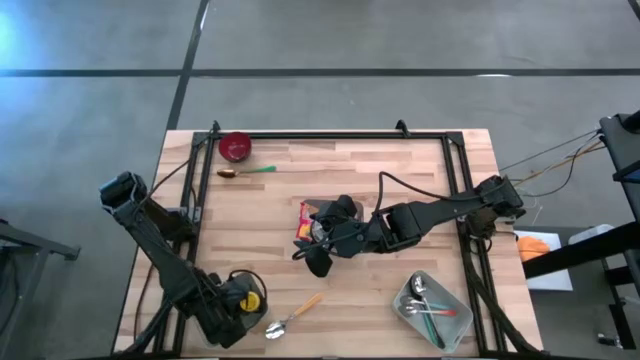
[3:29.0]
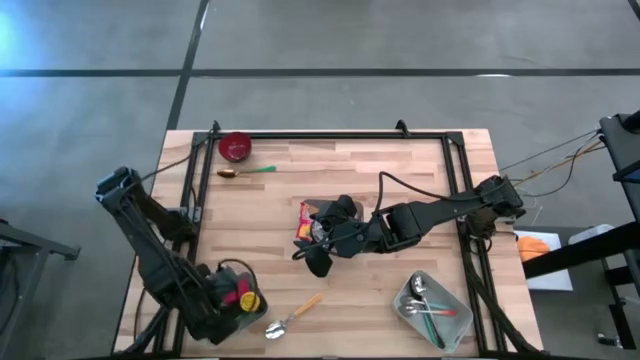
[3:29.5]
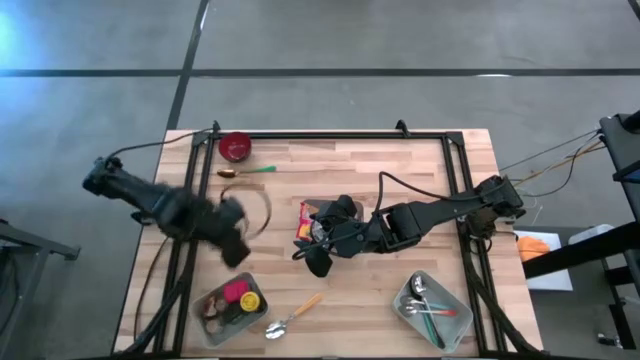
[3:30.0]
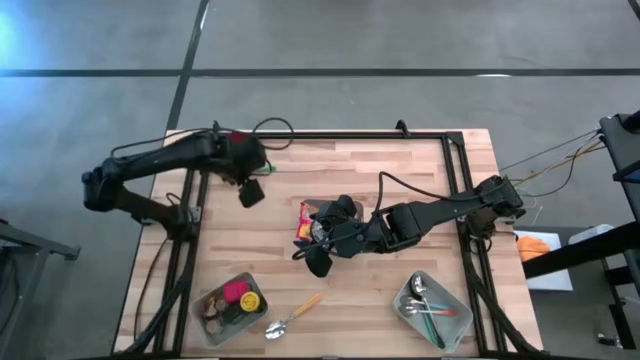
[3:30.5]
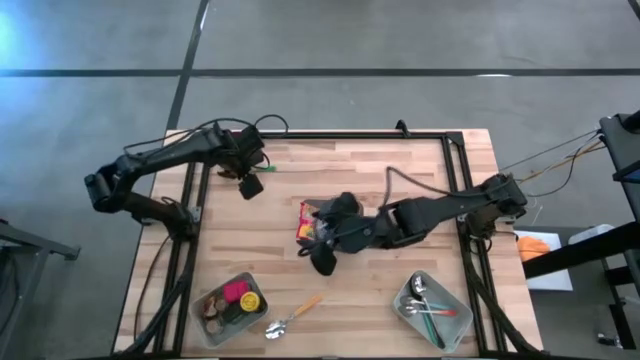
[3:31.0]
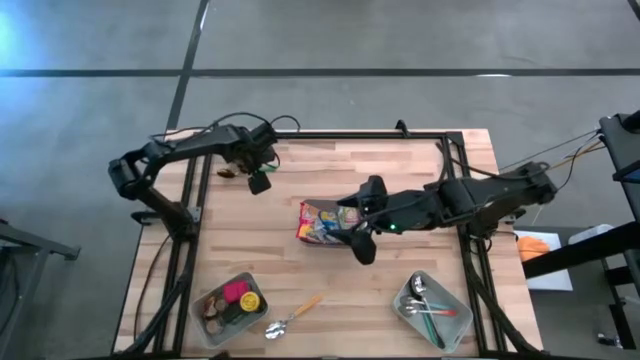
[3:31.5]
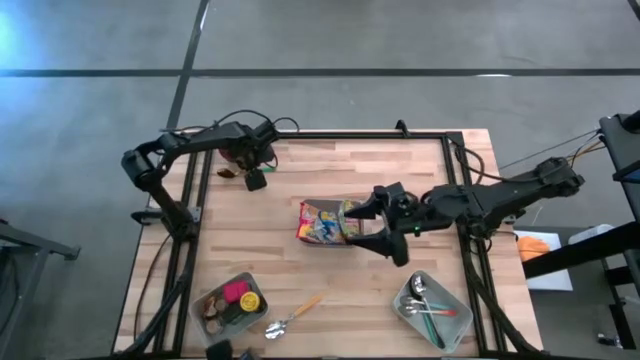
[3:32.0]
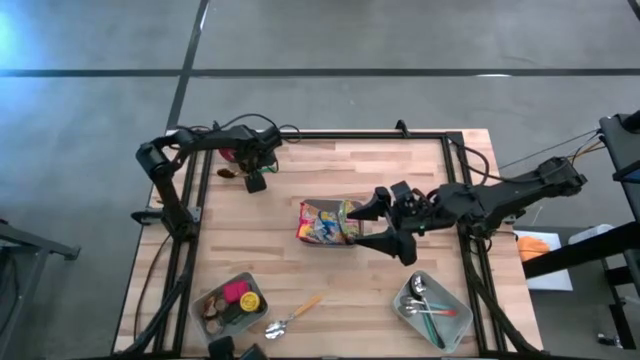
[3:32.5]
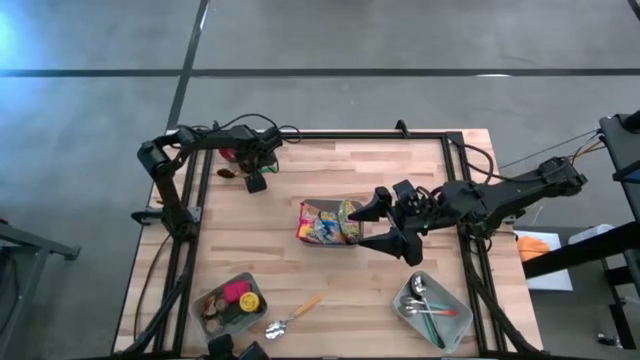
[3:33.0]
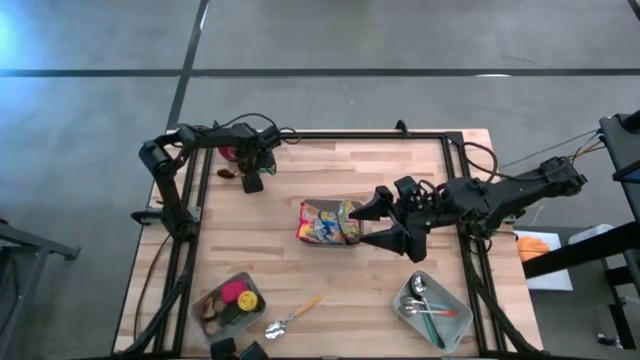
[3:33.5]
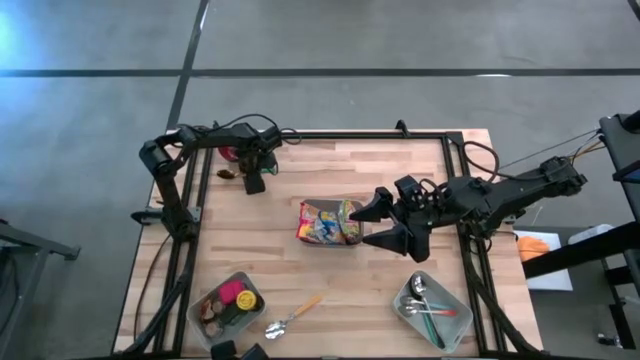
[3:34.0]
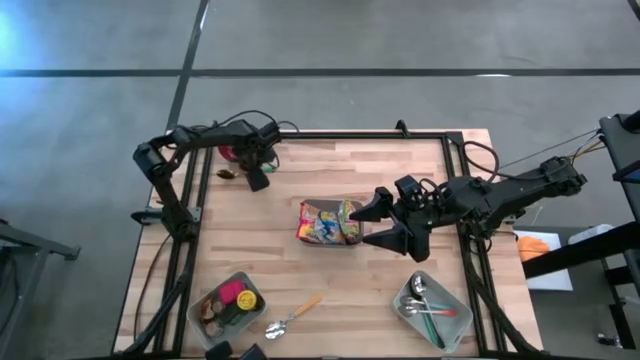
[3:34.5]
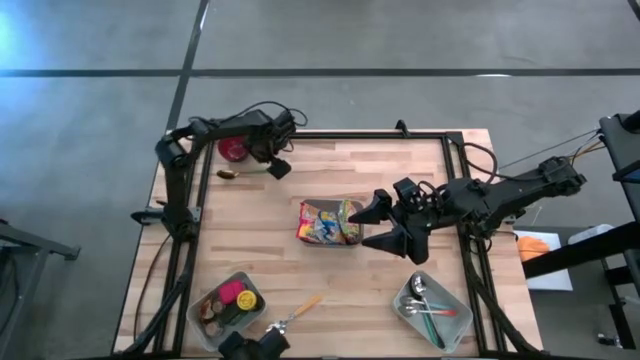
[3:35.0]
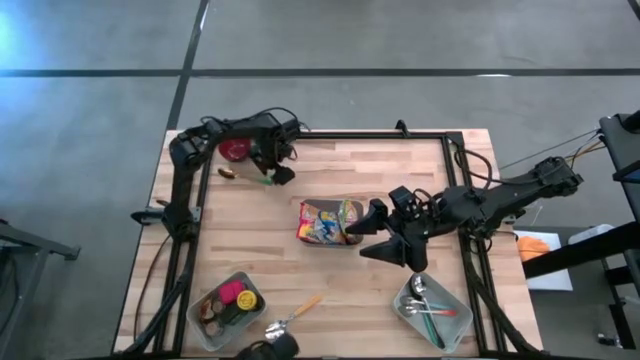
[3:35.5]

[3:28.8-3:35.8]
Put the green spoon into the right grey bin

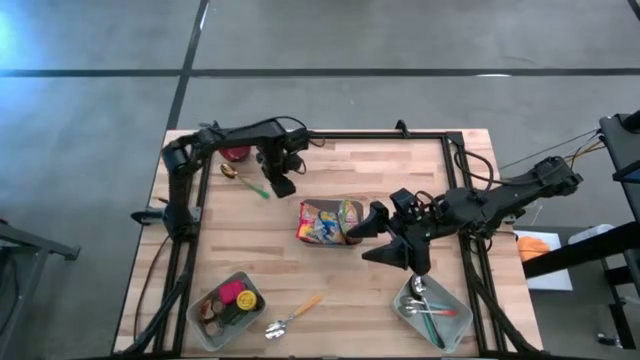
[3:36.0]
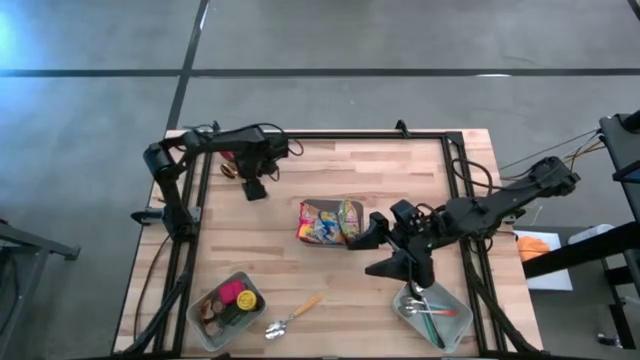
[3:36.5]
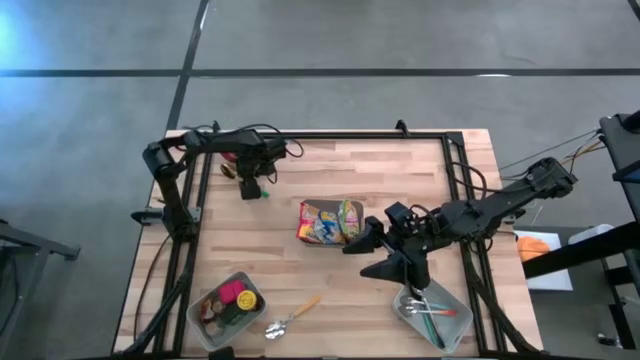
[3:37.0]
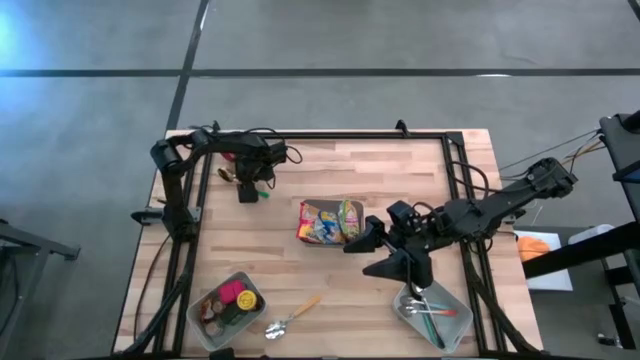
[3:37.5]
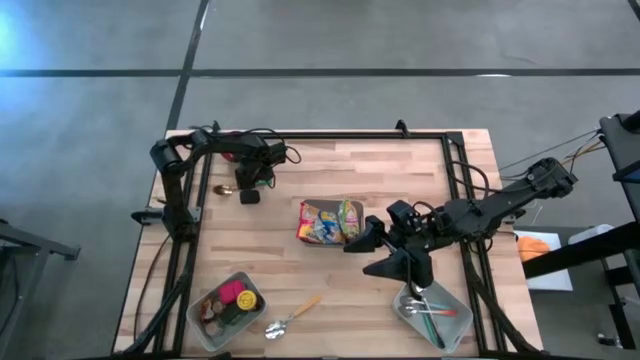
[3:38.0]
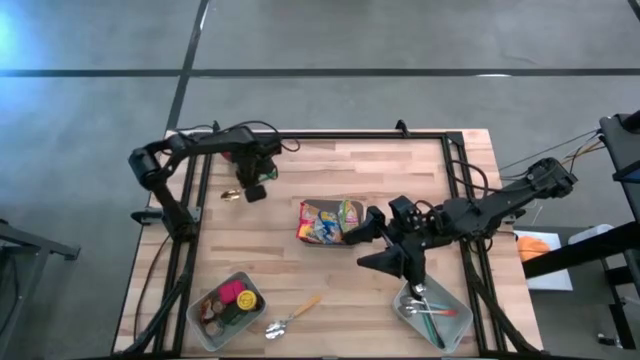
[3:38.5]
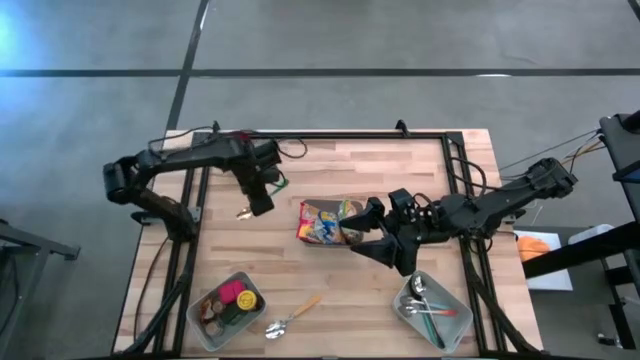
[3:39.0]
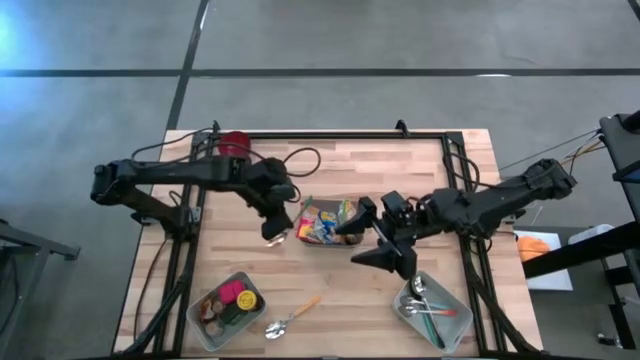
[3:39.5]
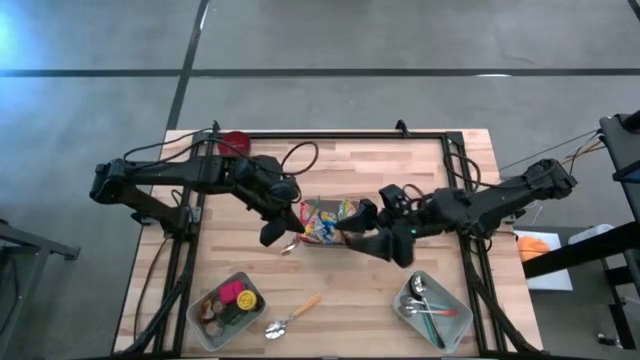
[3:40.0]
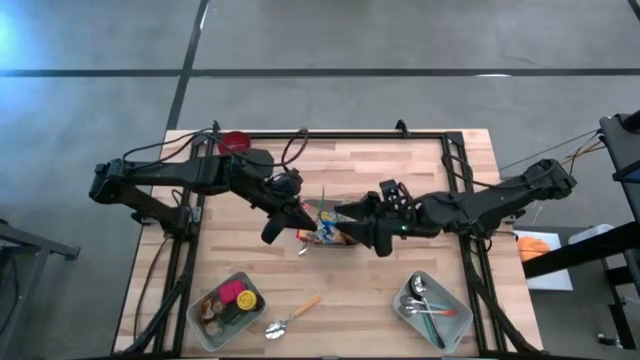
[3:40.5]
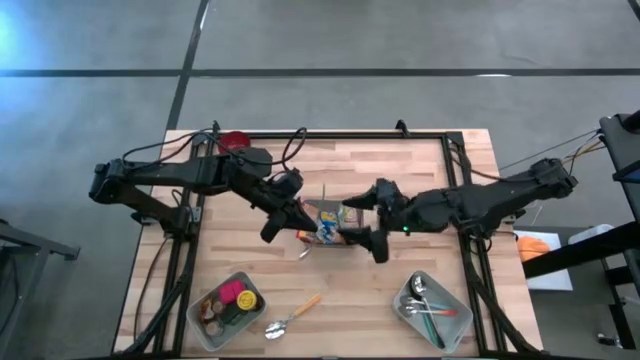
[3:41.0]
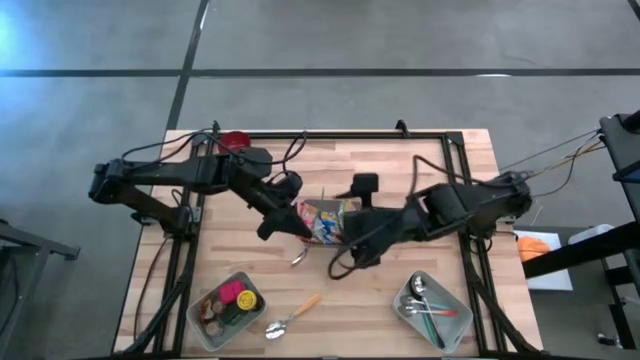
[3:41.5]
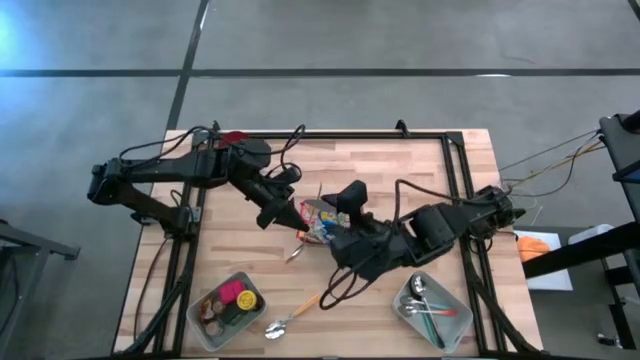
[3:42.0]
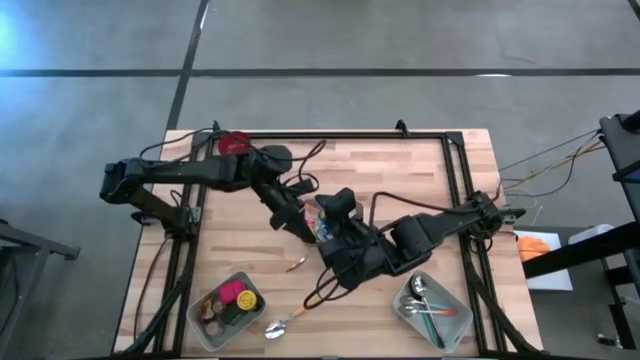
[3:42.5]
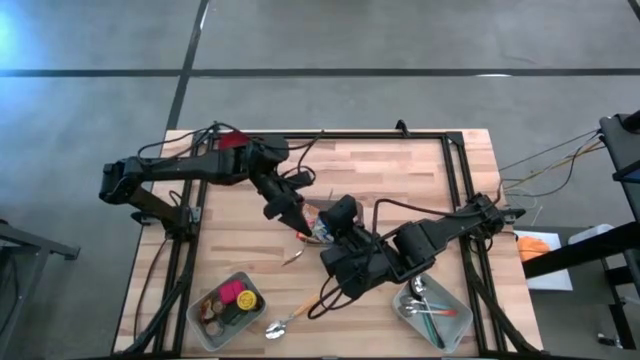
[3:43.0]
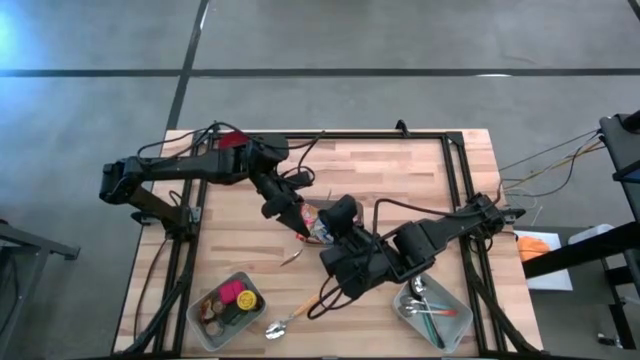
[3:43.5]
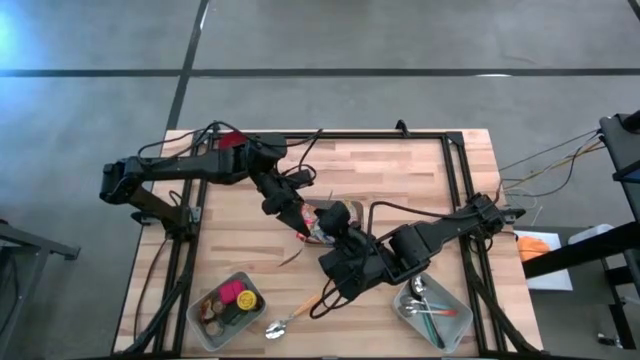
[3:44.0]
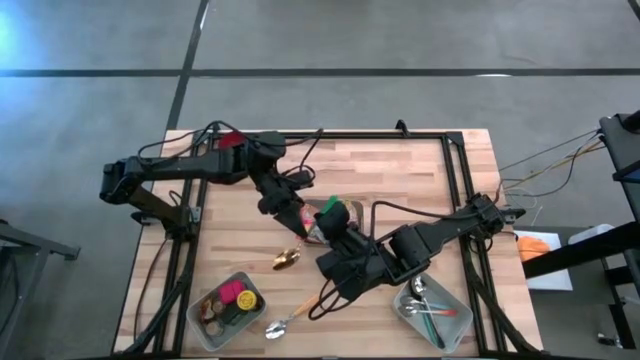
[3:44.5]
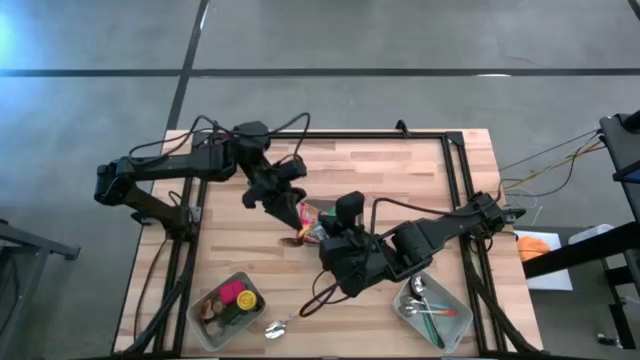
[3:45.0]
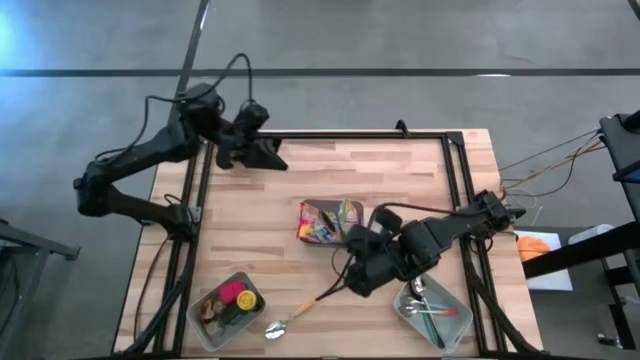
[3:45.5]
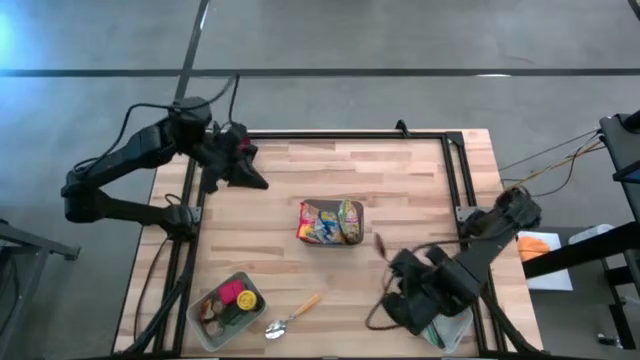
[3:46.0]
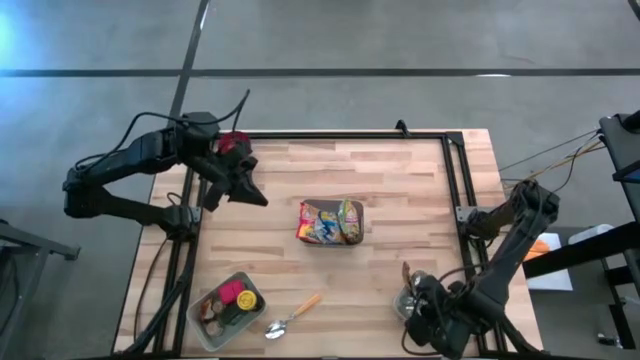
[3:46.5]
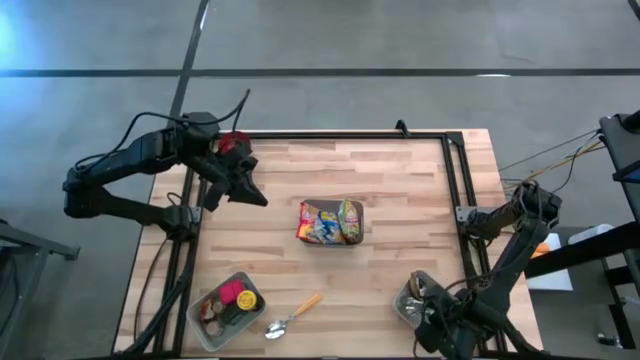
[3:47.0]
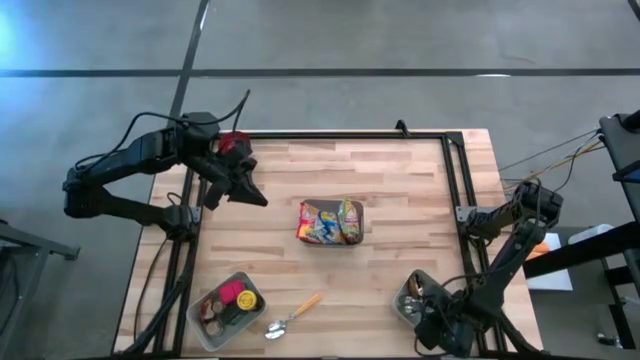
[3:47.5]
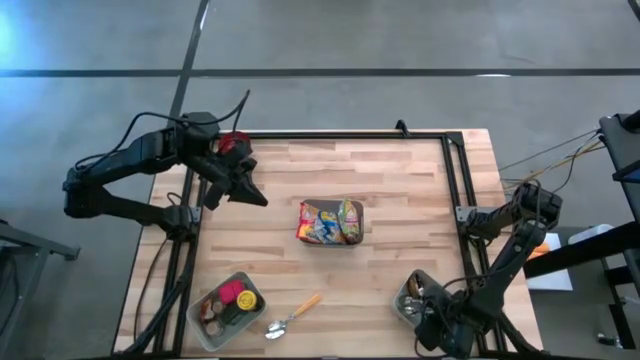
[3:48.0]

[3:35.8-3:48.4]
Put the light green spoon into the right grey bin

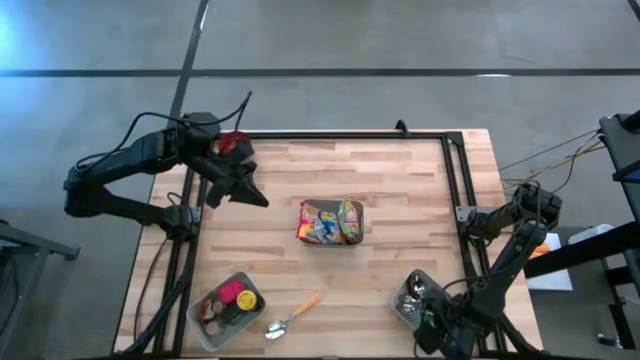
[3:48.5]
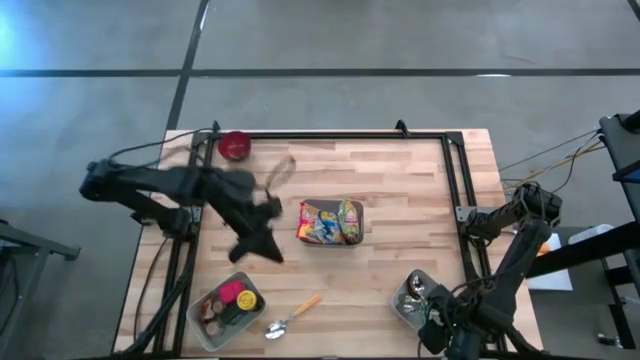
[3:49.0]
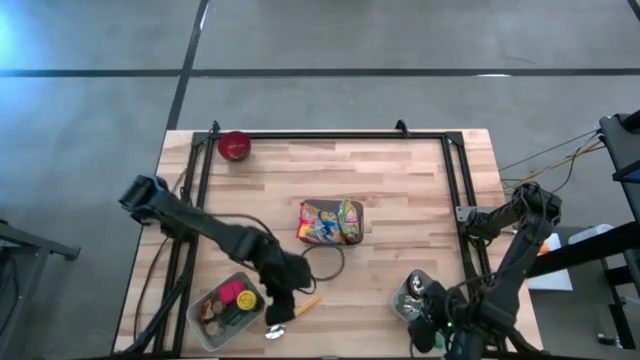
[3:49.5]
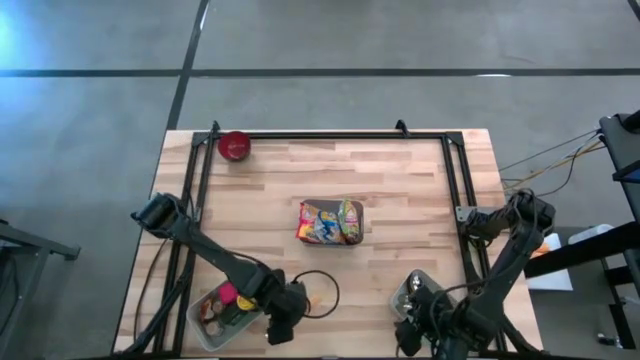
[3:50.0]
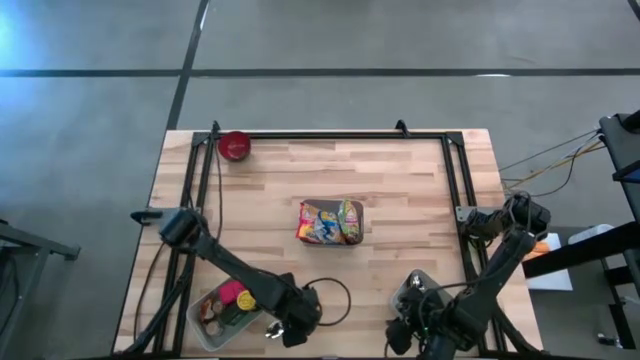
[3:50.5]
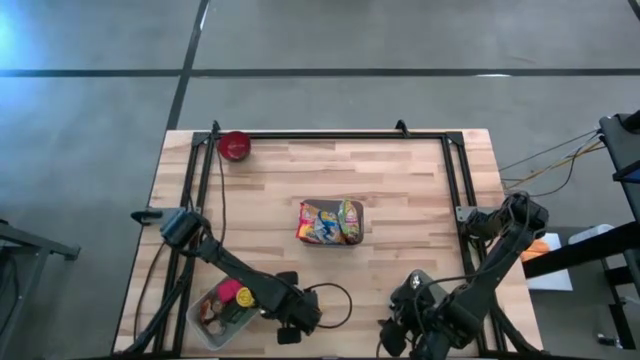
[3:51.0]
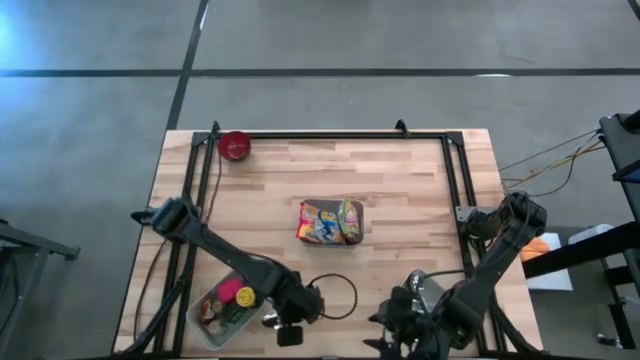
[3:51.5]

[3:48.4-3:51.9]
Put the yellow spoon into the right grey bin
